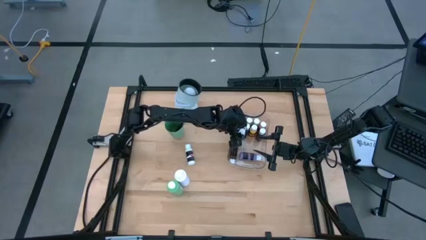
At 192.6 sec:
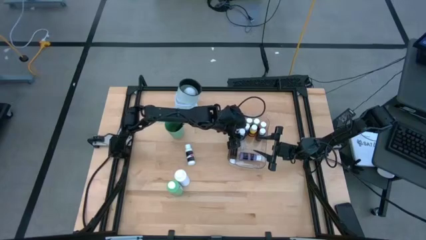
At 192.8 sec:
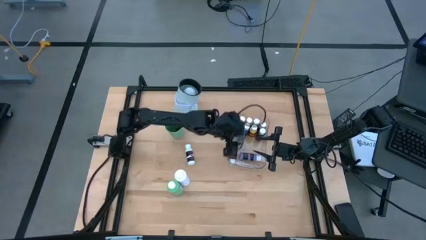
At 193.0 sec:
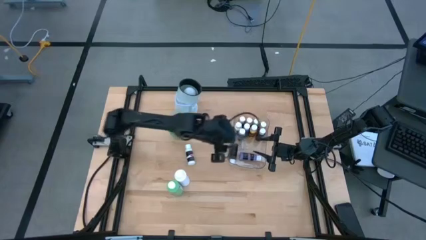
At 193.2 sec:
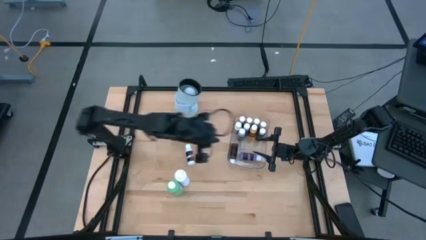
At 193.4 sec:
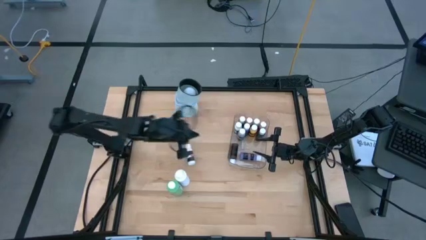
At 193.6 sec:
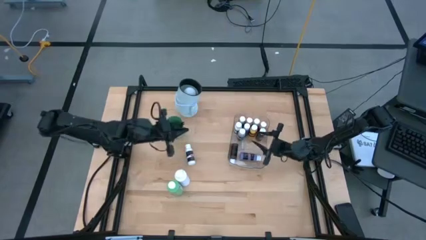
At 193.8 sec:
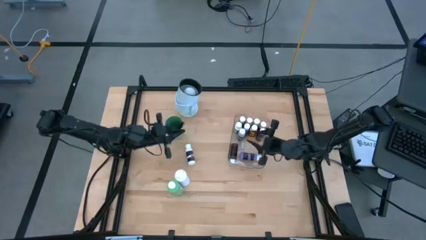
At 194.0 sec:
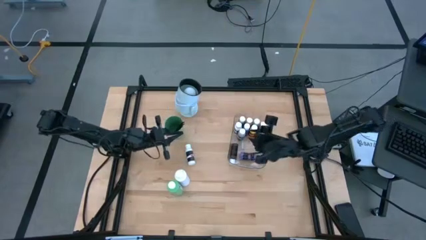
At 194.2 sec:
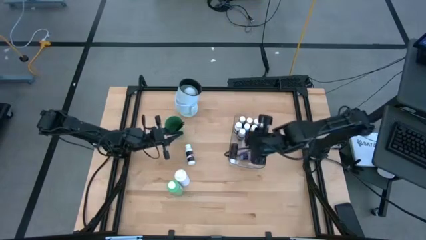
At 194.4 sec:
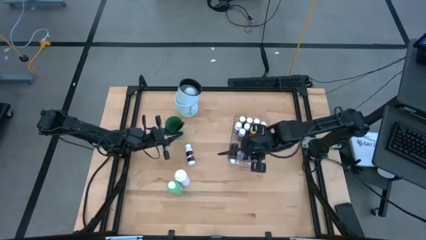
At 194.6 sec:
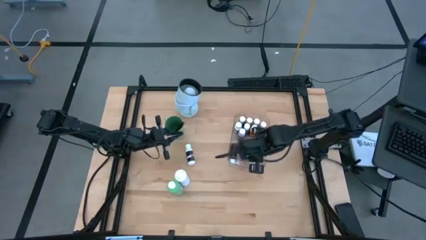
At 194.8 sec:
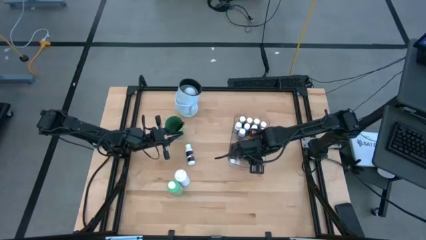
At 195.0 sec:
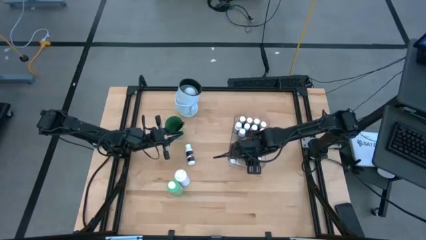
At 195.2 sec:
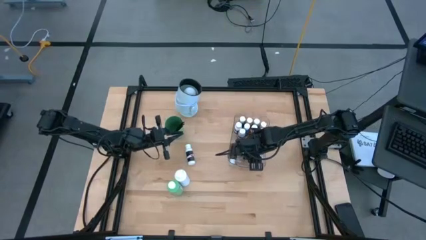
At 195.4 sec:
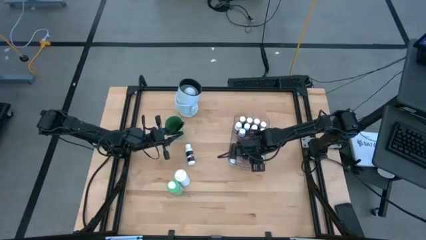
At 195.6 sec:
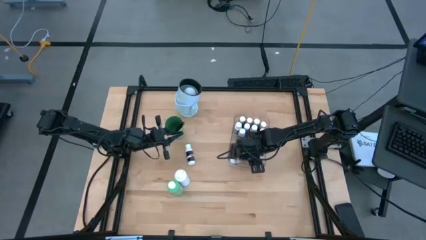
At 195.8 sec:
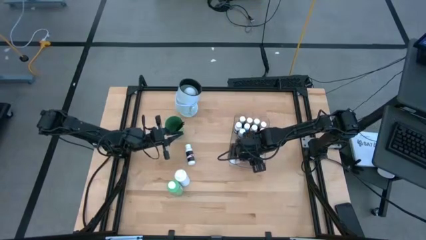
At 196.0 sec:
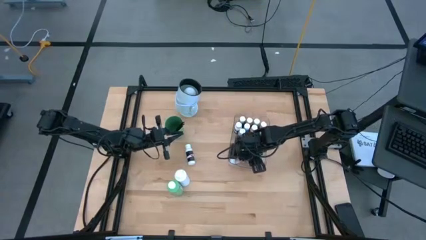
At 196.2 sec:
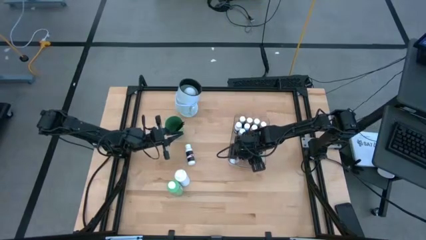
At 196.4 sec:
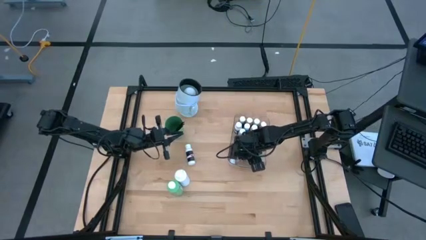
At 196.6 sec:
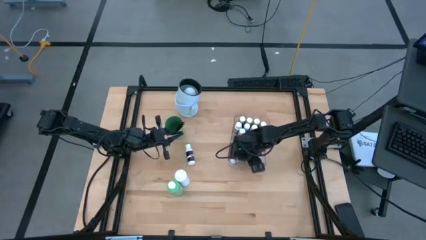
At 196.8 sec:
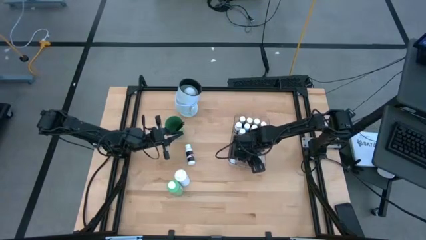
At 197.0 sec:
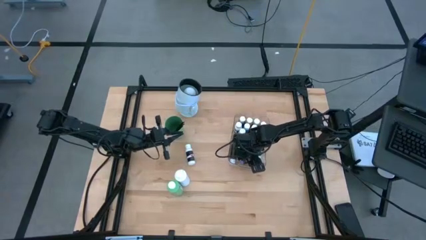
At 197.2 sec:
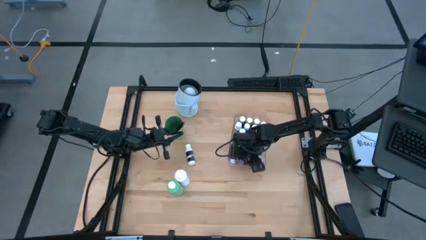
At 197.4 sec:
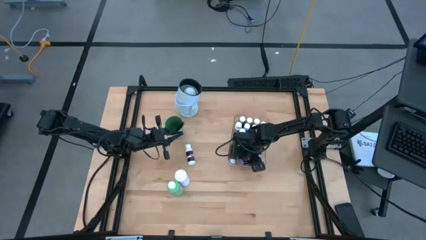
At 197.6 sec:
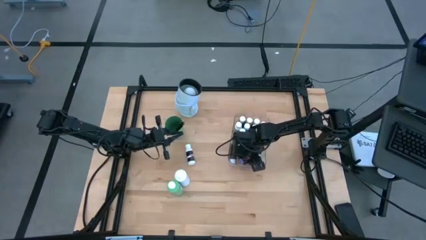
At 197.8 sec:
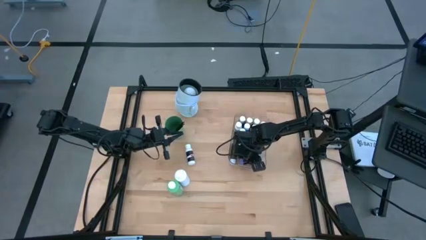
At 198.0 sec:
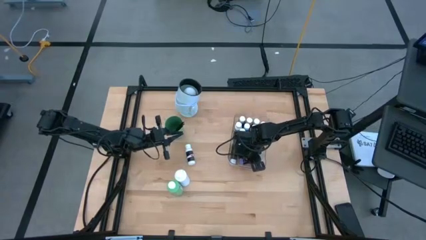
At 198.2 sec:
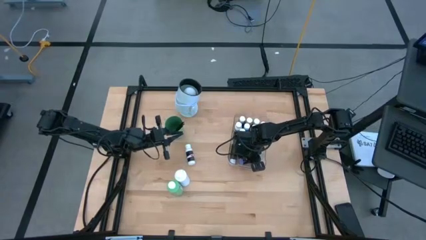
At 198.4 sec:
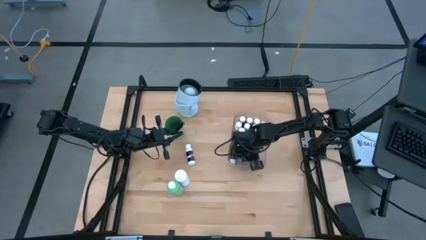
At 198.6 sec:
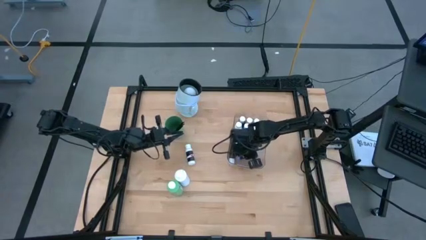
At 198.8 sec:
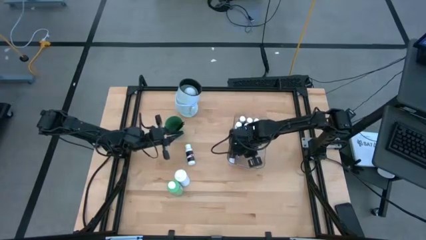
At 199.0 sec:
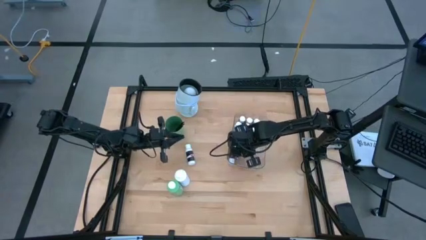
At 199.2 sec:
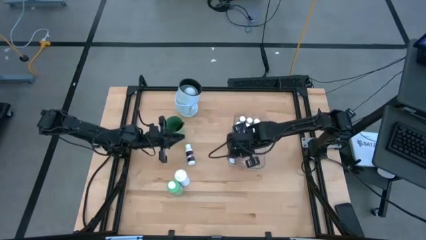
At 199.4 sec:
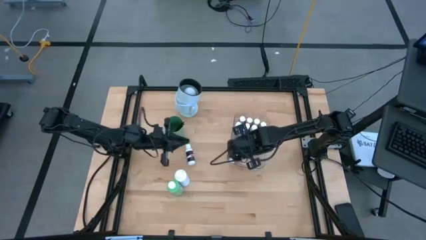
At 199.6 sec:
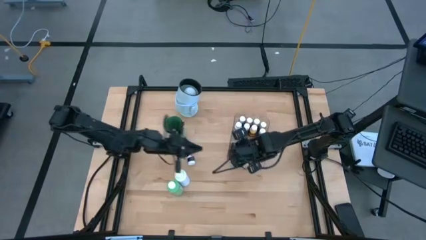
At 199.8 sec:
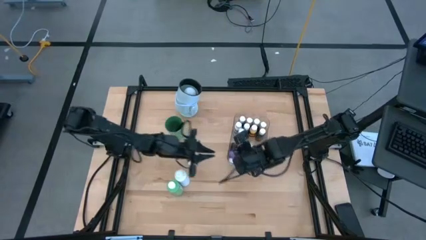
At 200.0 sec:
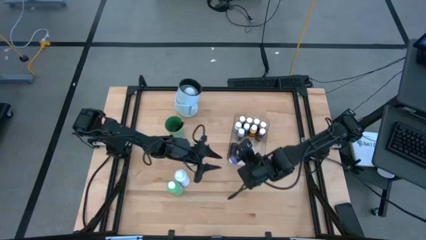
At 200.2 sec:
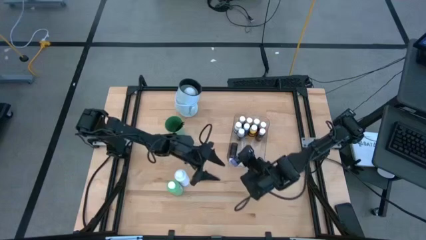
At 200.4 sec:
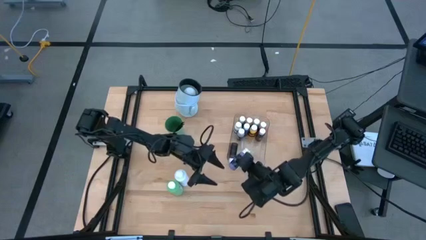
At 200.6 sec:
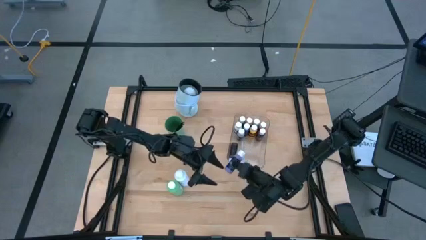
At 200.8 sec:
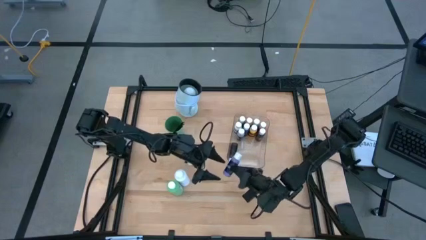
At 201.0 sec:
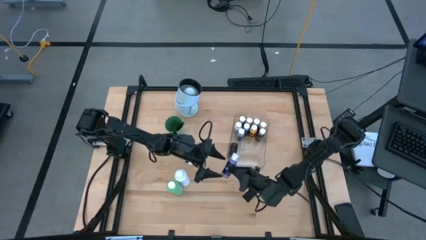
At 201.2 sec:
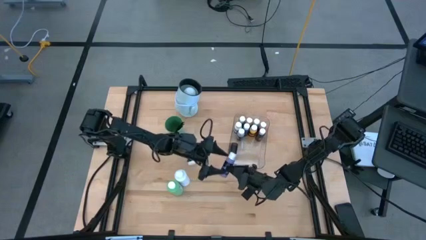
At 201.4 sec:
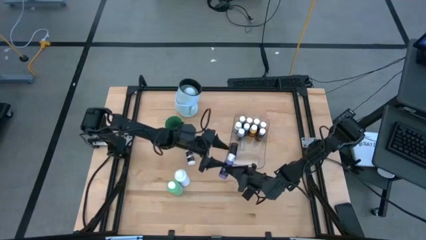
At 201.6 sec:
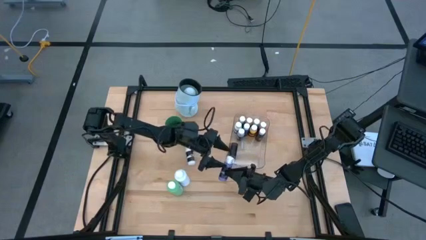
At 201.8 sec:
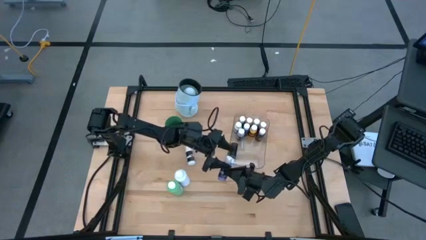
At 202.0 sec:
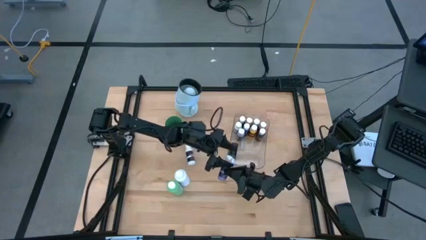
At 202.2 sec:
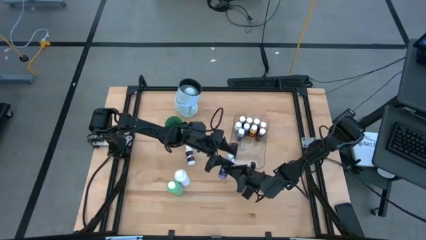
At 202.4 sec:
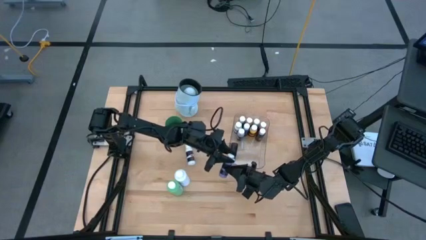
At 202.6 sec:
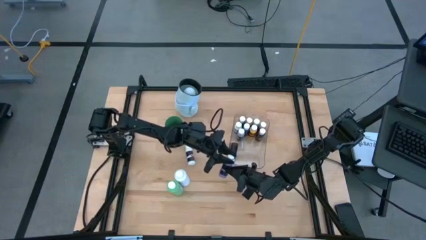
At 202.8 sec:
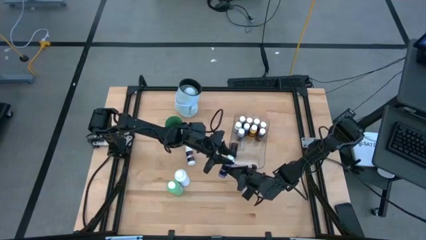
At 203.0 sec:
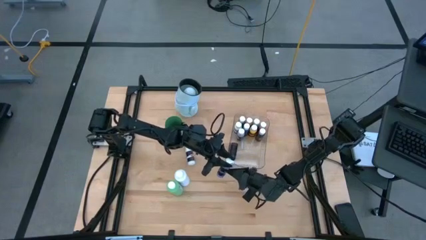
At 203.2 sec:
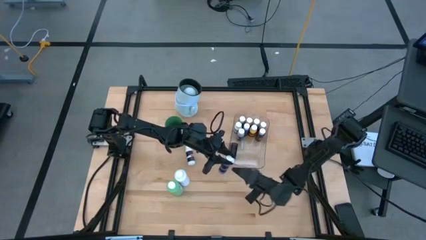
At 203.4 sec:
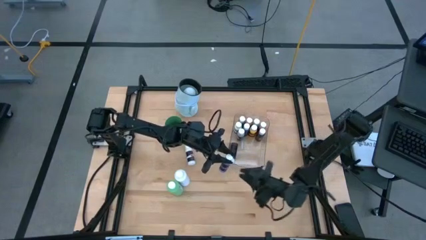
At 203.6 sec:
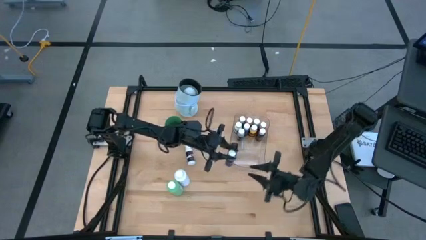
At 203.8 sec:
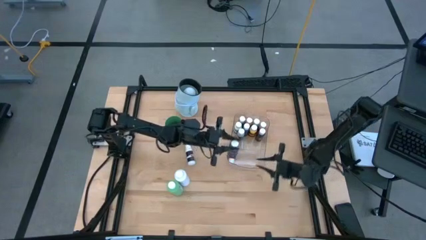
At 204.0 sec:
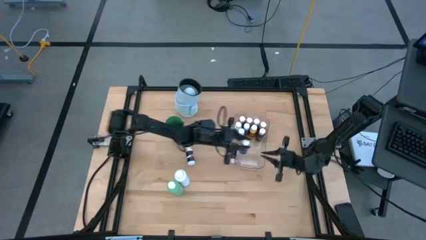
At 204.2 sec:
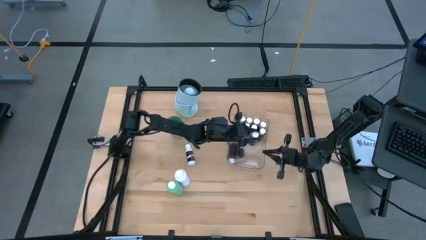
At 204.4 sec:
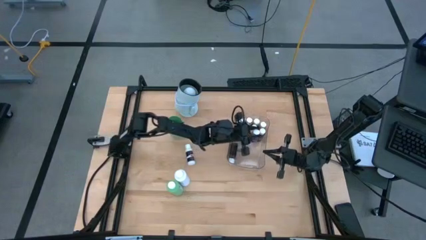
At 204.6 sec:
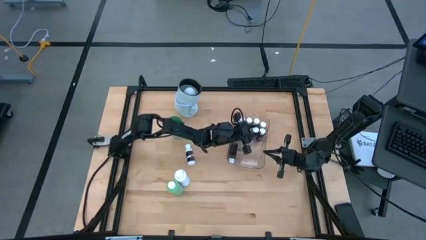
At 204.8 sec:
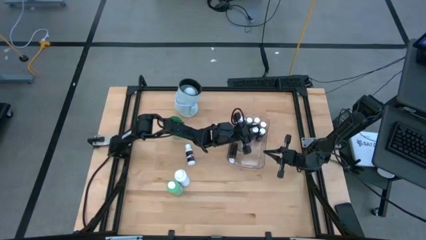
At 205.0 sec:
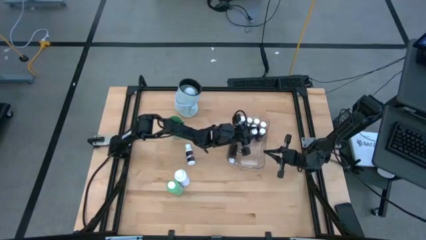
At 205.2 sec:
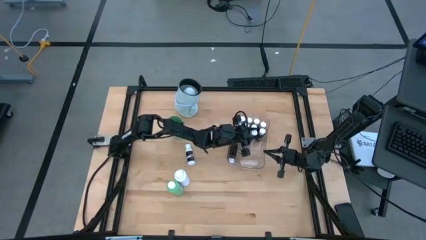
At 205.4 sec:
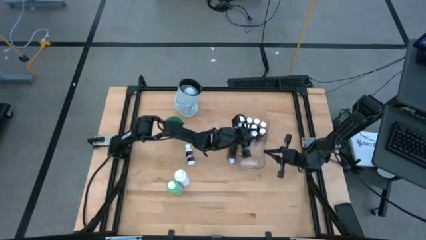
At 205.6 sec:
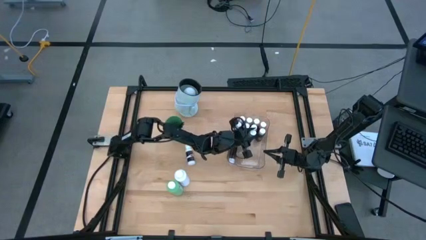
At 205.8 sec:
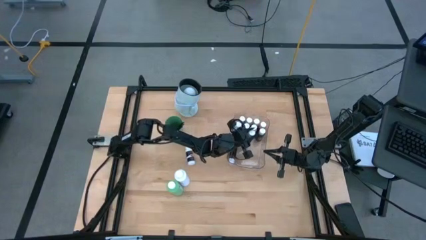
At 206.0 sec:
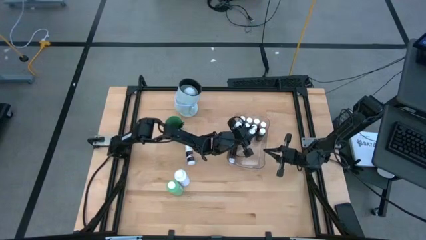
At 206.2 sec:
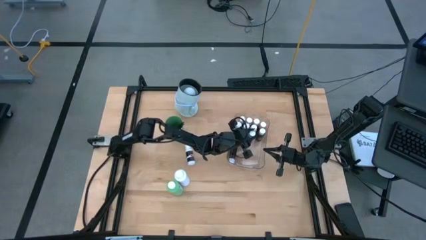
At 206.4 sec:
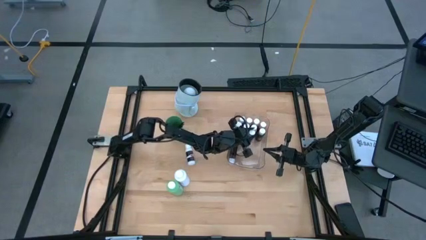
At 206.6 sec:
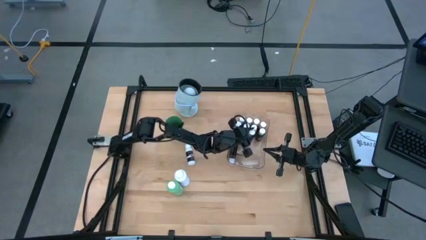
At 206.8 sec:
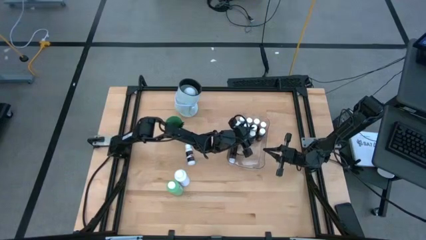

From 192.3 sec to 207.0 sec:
Task: Pick & Place Paint Supplies
Adjust the purple paint bottle into the transparent bin
